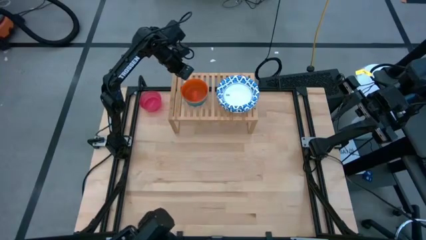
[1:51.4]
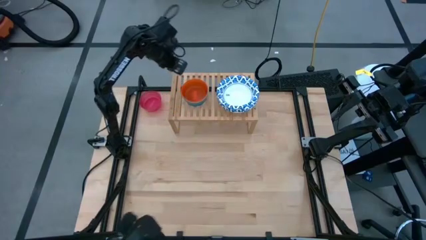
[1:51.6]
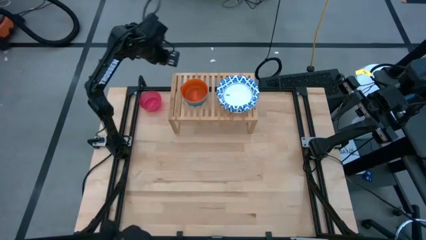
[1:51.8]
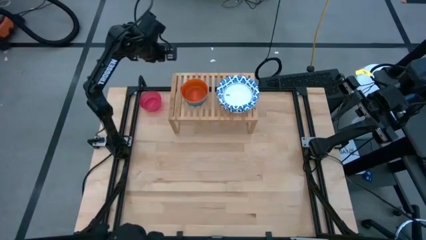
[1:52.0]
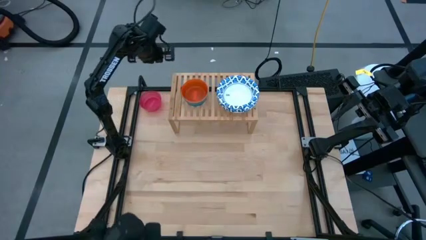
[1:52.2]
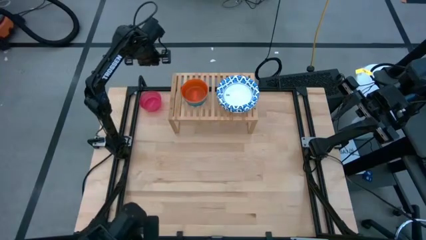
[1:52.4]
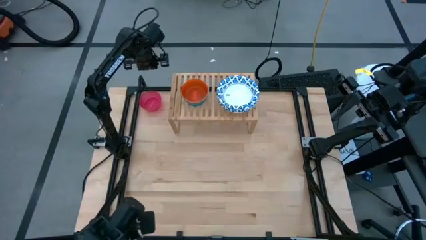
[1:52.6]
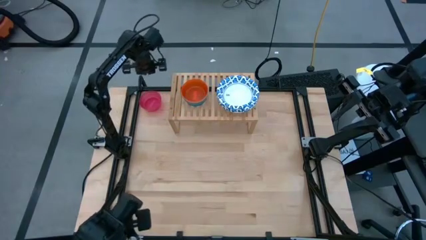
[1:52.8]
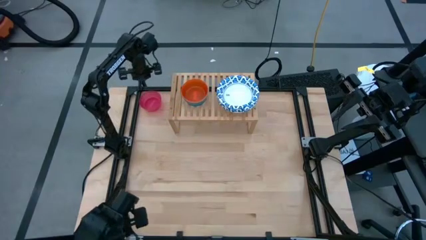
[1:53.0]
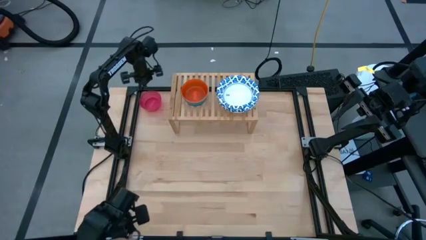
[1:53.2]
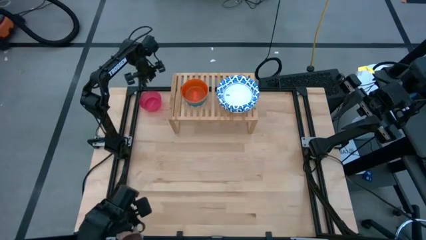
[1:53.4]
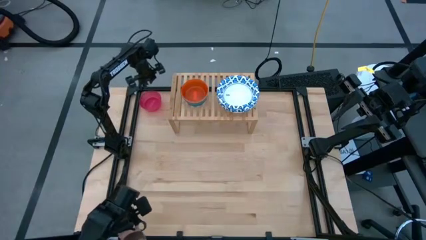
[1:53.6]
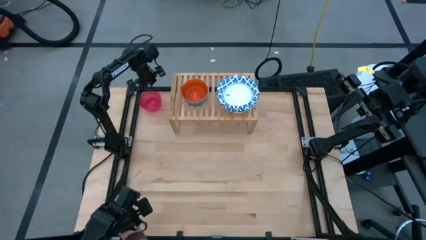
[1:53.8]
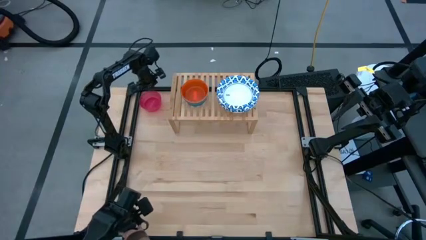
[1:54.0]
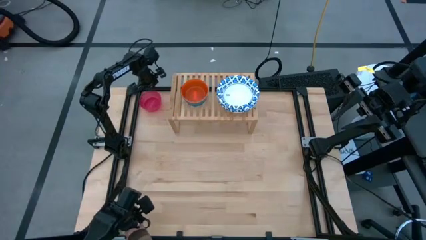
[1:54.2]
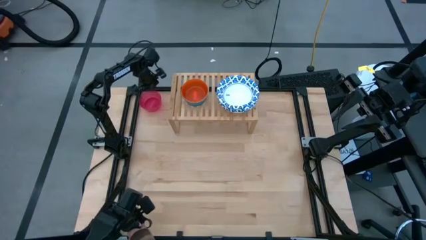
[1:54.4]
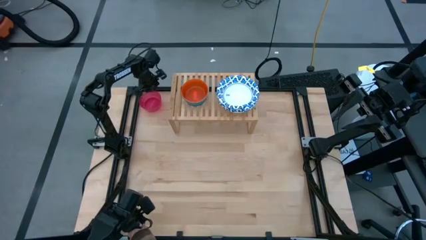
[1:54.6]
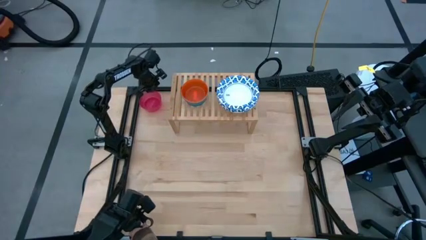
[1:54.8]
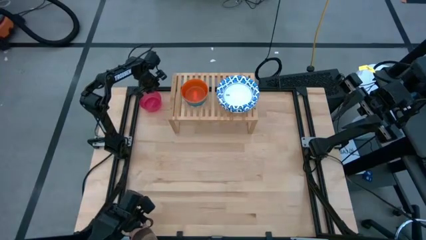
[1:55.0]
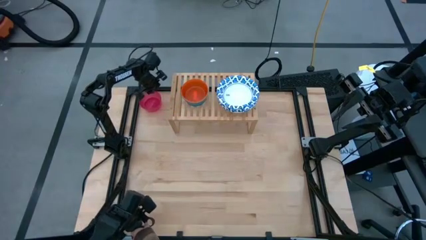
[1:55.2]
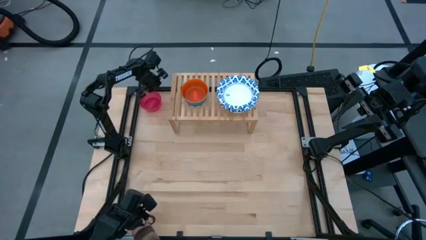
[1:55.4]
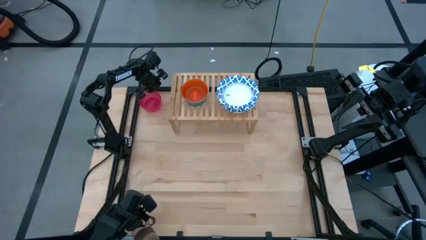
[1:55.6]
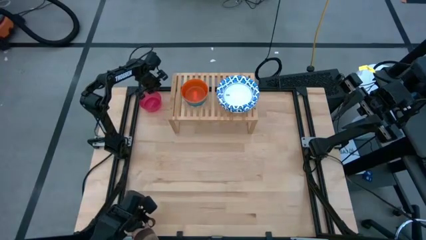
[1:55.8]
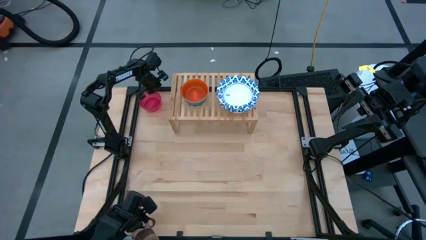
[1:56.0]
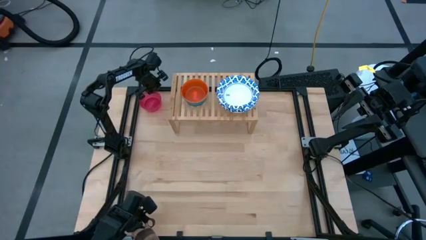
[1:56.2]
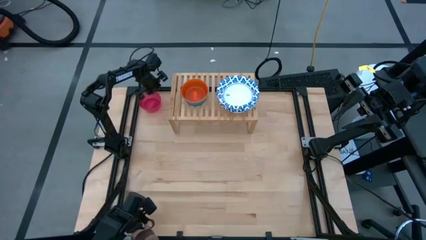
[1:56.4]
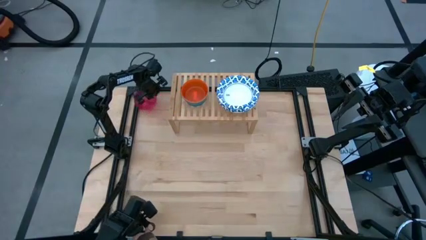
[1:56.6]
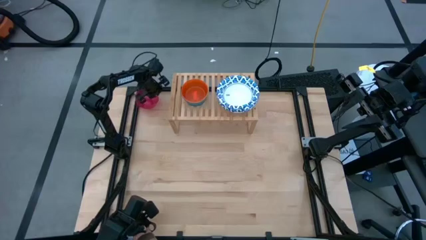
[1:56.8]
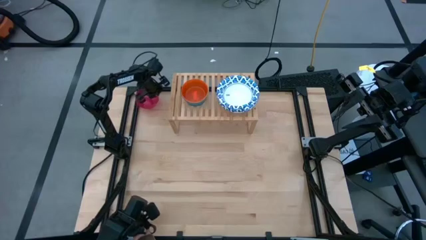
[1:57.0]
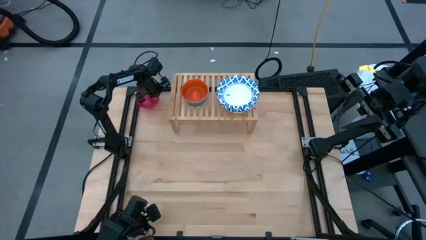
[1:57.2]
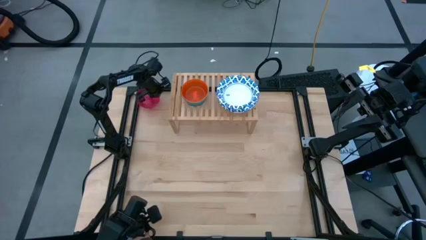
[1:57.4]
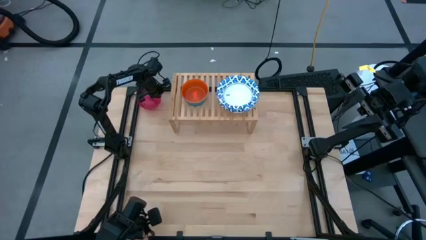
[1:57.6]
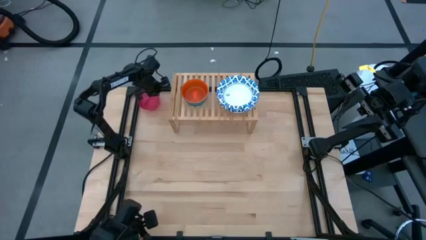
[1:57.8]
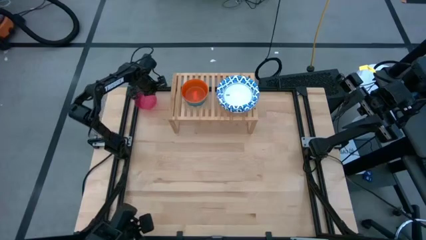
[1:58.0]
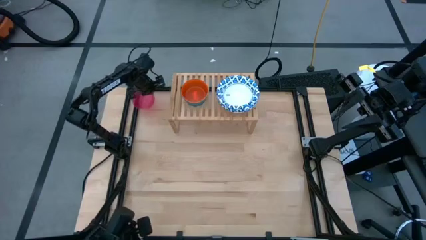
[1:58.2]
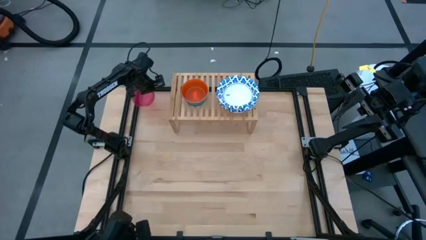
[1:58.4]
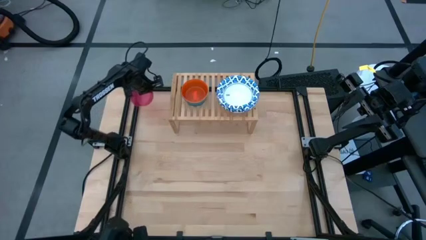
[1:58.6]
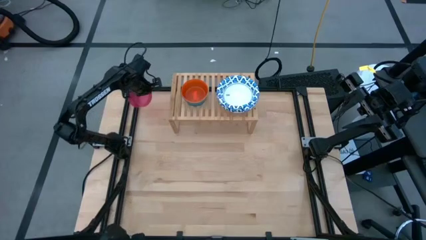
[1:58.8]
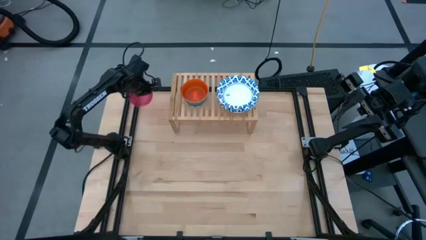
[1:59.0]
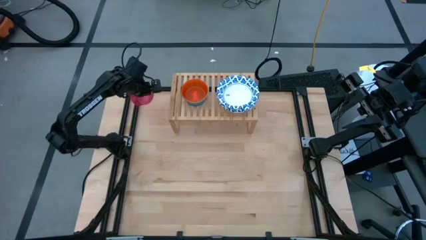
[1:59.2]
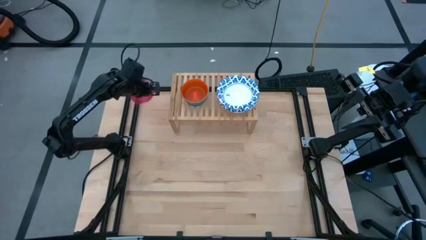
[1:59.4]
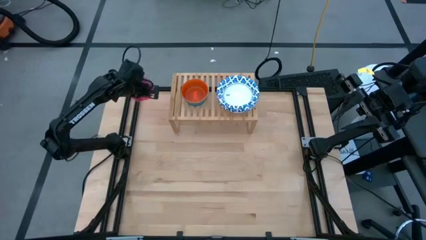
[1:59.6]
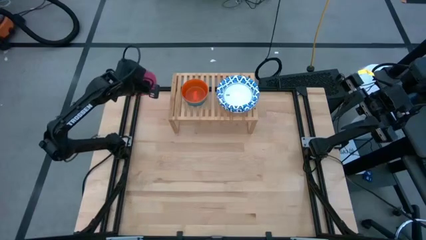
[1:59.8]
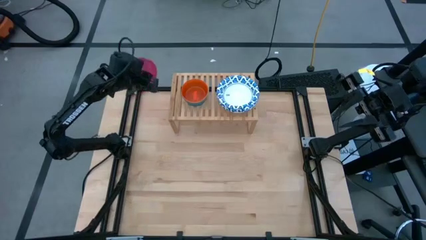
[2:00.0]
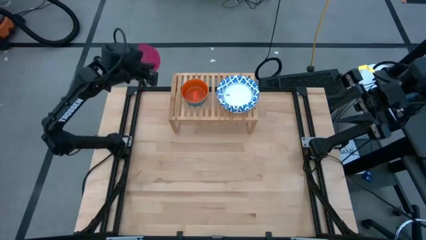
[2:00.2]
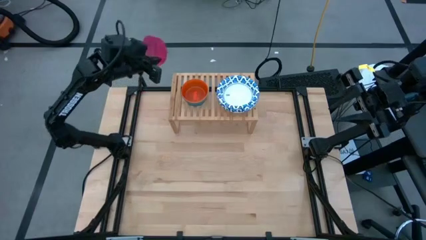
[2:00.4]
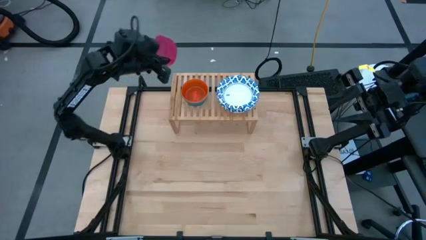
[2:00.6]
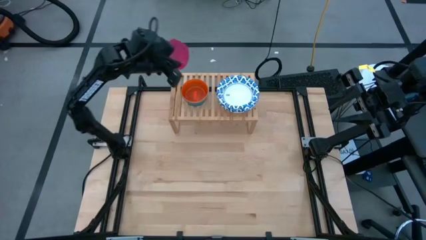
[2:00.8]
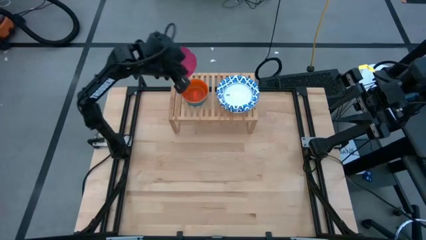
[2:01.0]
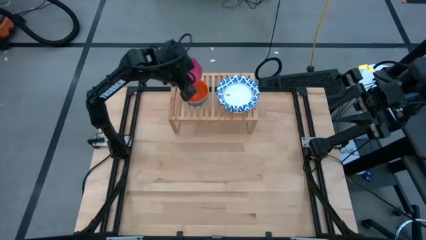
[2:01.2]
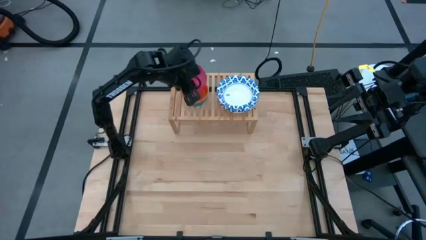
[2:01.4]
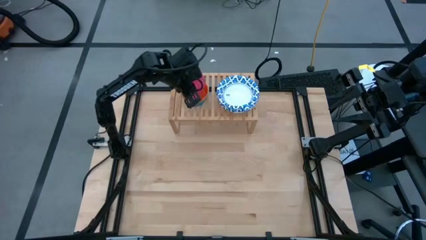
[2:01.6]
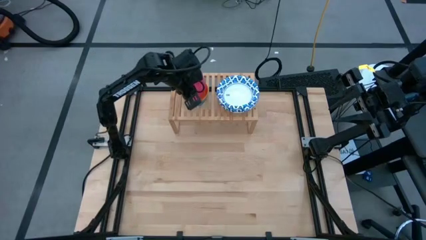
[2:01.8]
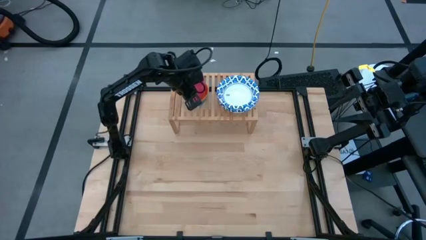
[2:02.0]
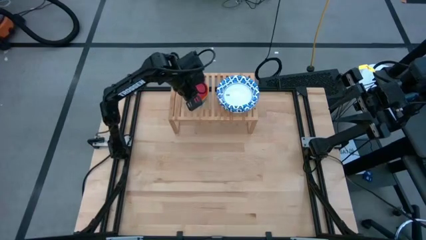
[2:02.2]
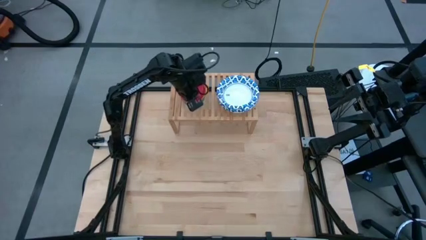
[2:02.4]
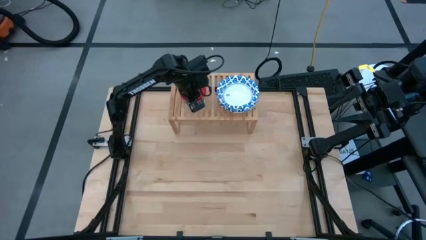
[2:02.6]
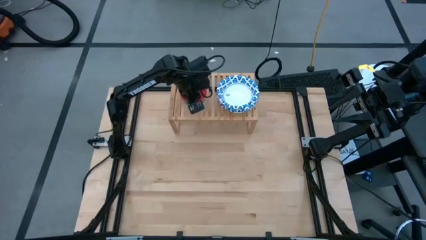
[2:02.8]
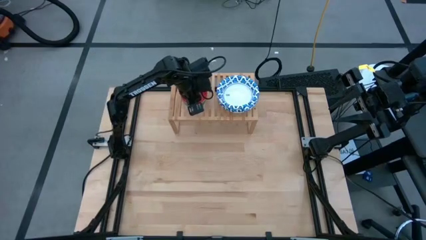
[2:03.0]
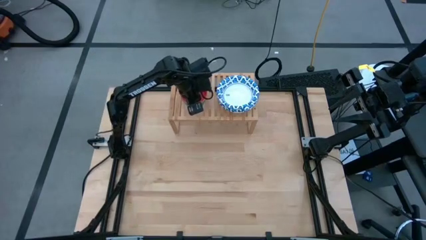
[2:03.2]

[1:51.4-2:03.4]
Task: Place and stack bowls onto a shelf
Stack the pink bowl on top of the orange bowl on the shelf
